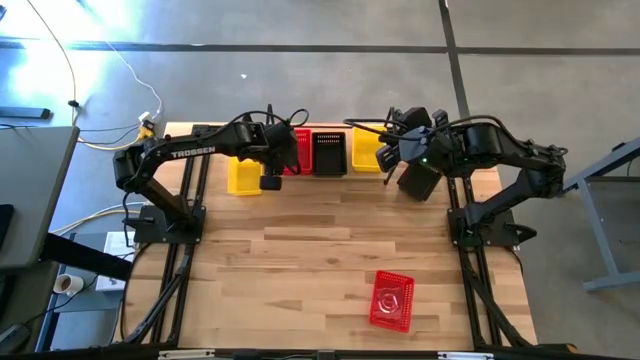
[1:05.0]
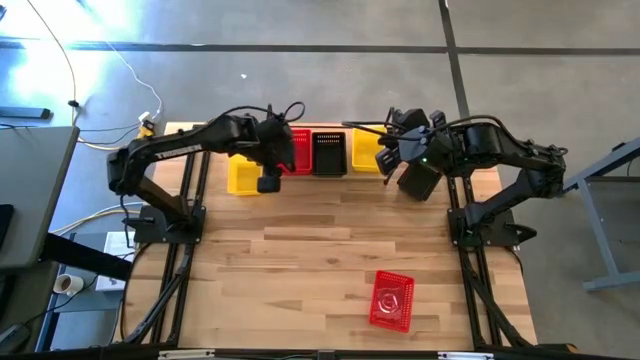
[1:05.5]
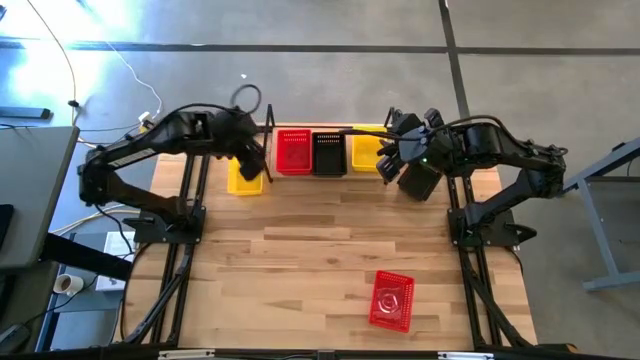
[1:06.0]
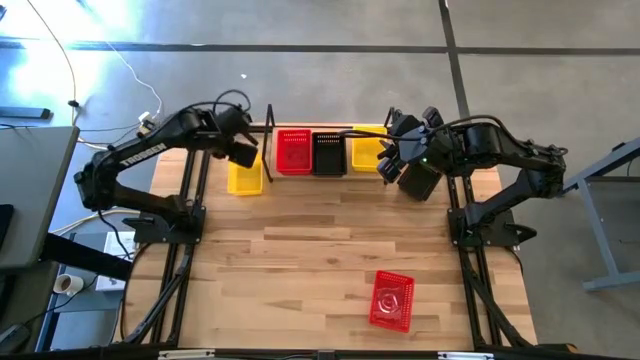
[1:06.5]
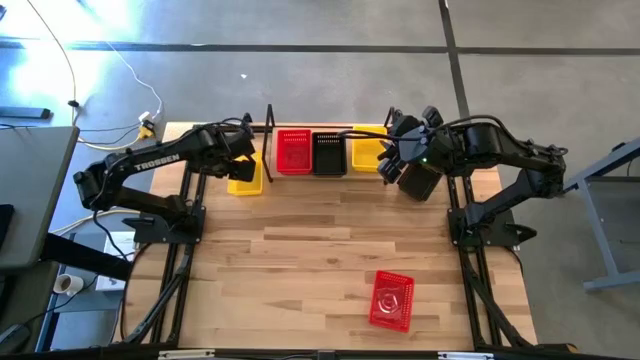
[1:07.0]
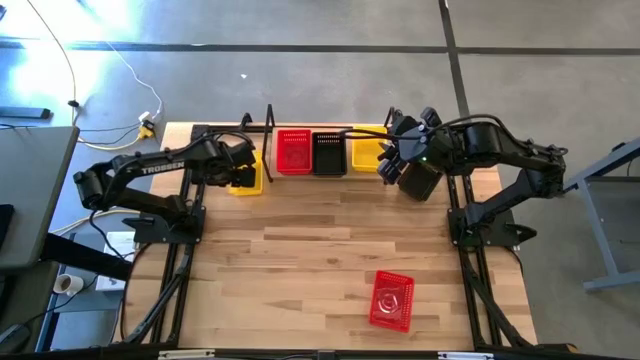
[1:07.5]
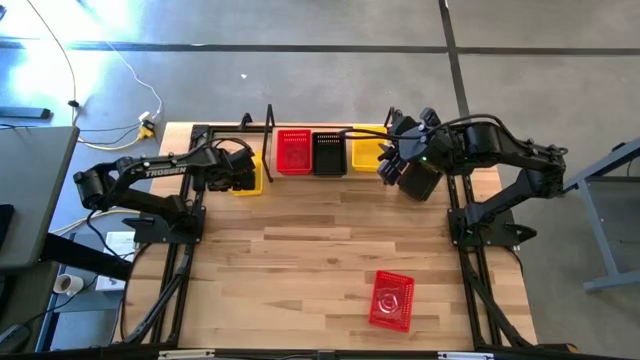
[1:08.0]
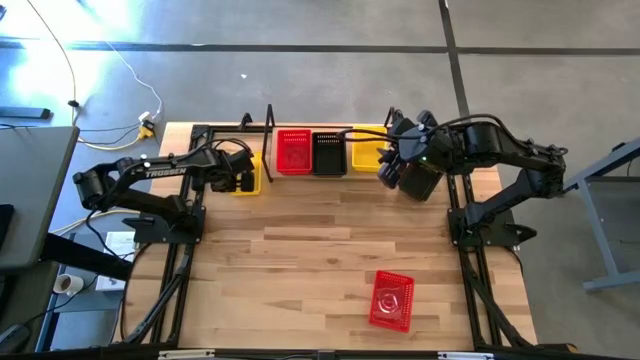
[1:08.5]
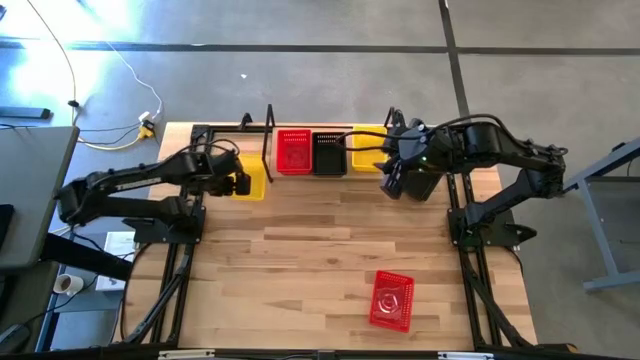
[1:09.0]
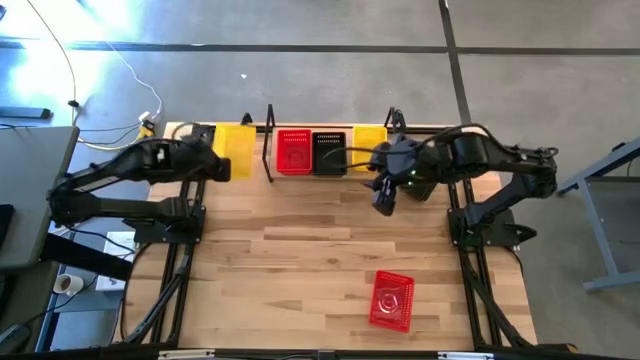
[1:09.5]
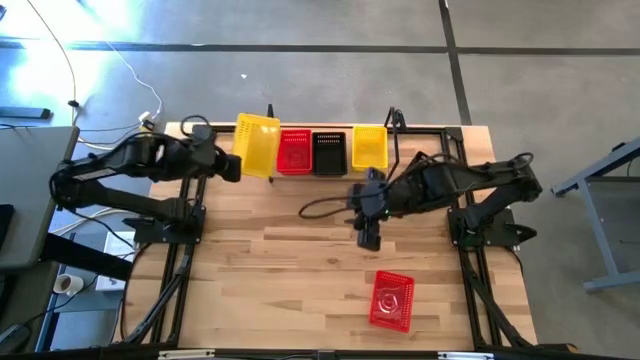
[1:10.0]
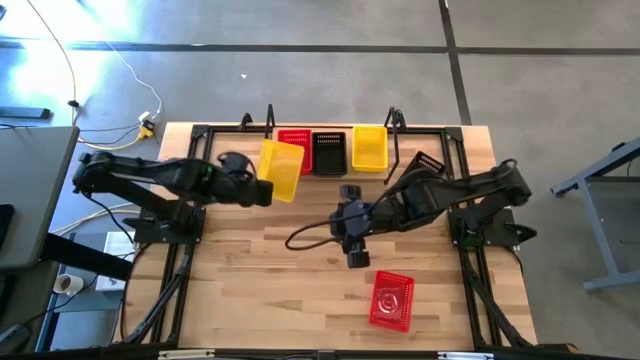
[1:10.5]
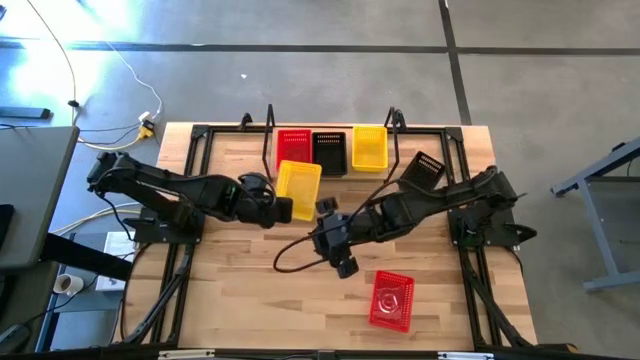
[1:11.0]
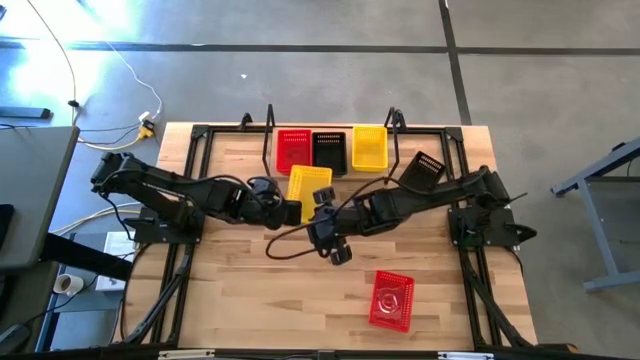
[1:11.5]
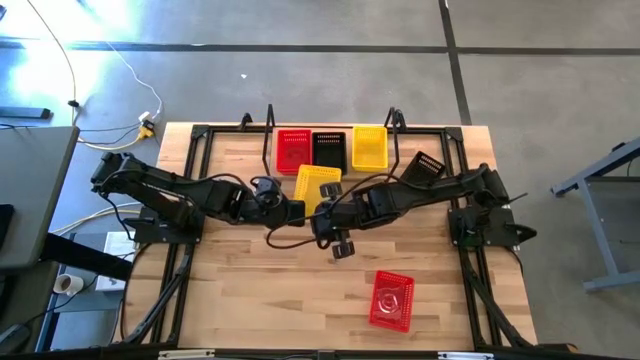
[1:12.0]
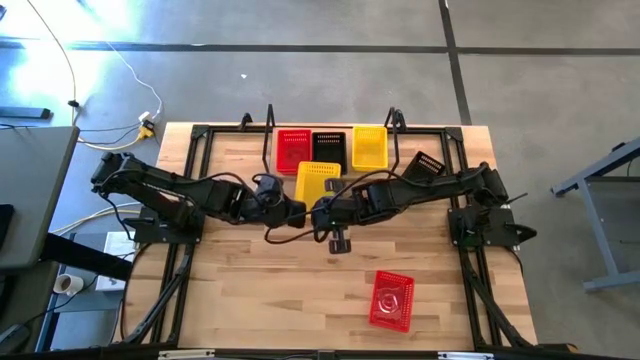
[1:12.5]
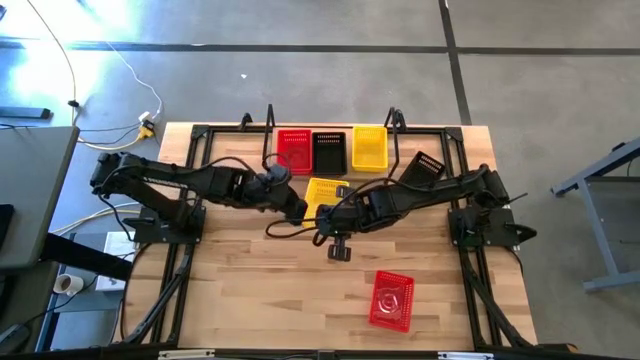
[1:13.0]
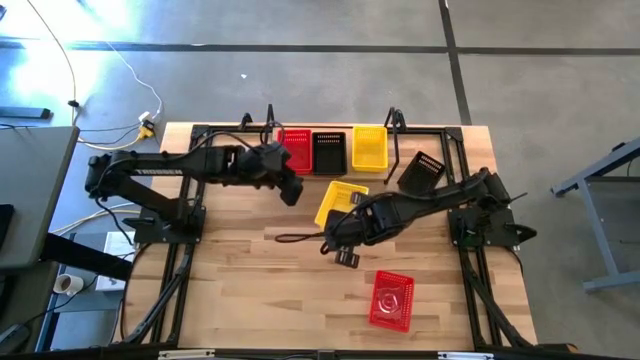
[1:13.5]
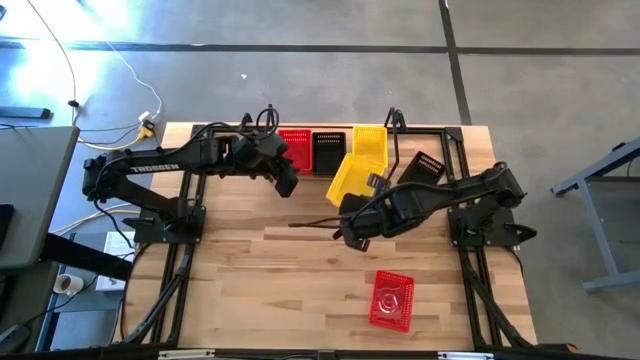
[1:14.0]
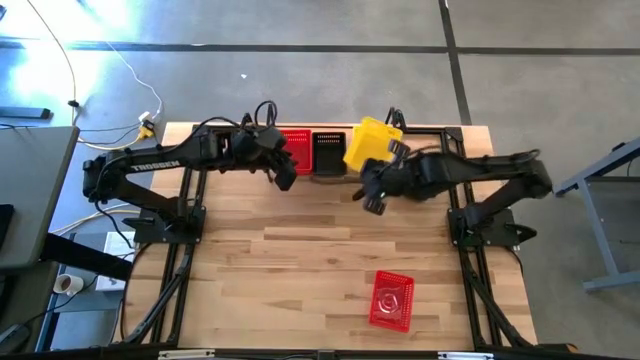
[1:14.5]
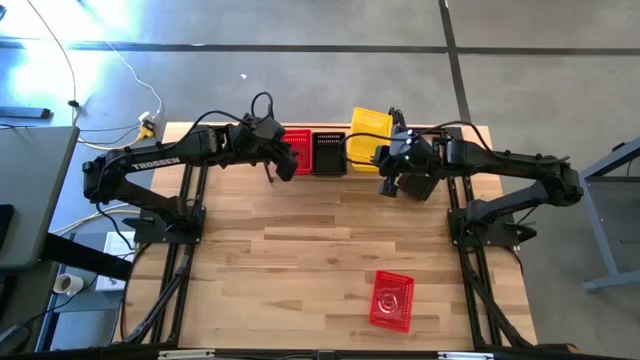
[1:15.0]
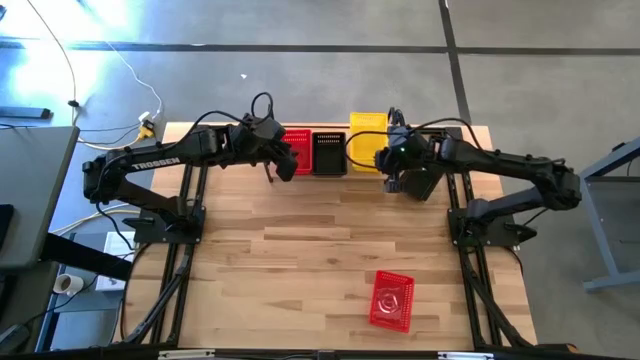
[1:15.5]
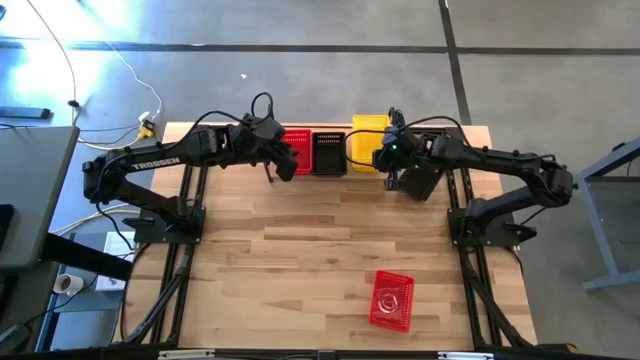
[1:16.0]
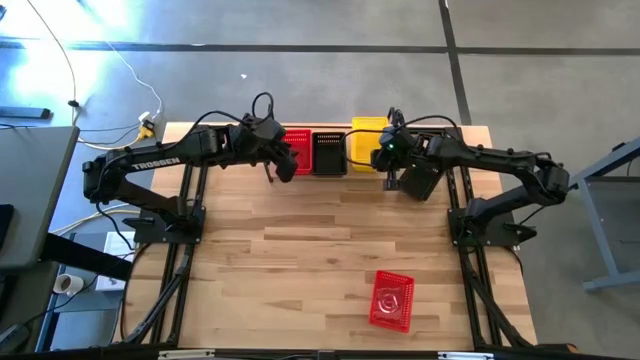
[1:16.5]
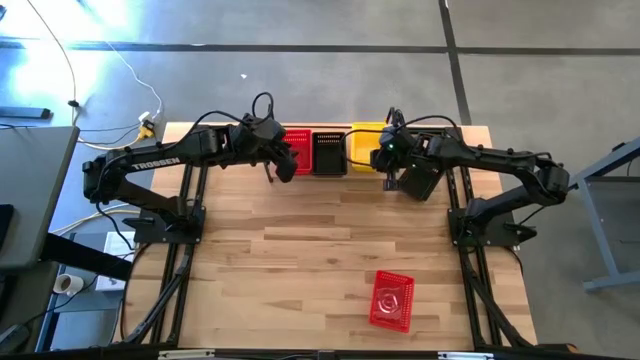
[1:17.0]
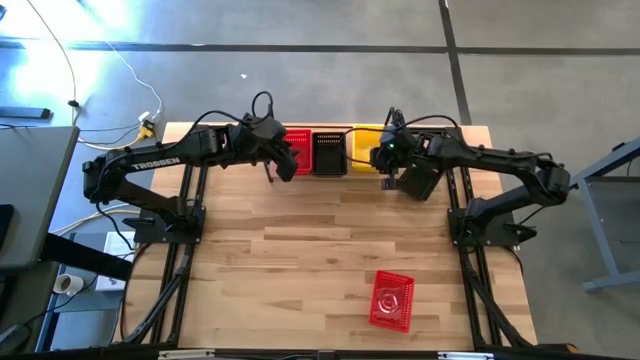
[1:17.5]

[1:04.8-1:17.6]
Task: Stack baskets on shelf by color
Stack the yellow bin on the yellow bins on the shelf

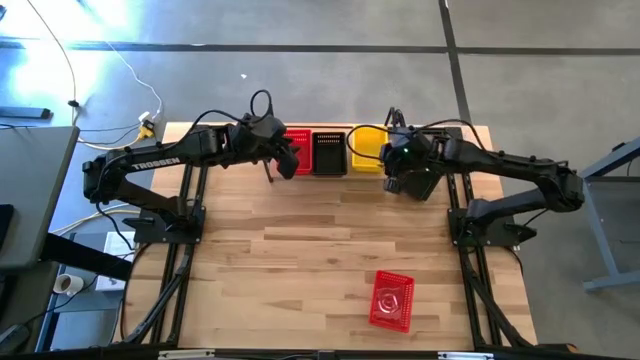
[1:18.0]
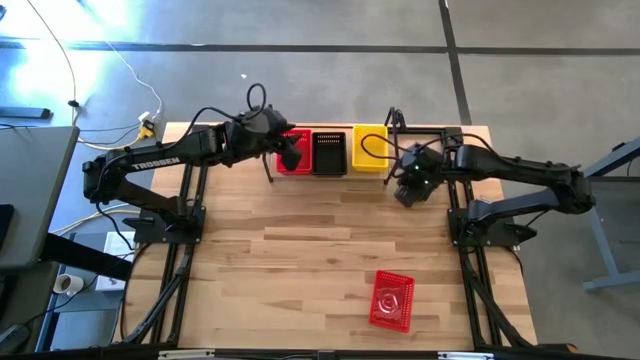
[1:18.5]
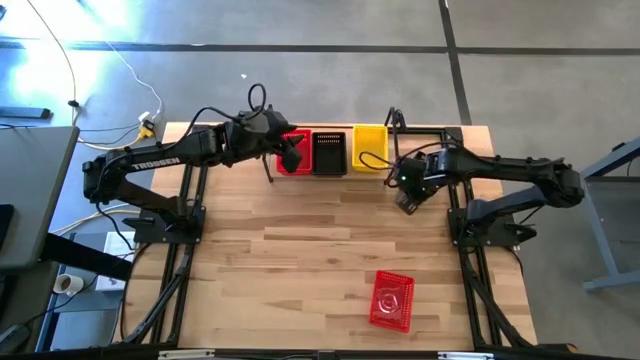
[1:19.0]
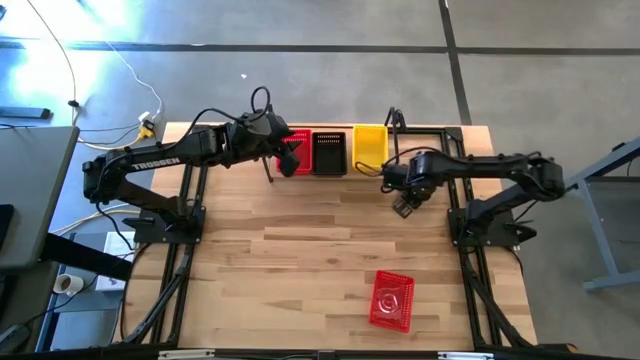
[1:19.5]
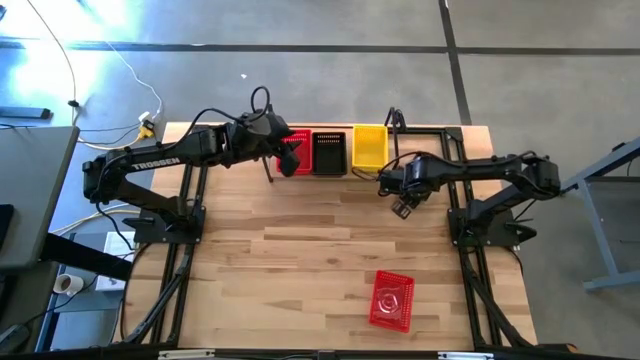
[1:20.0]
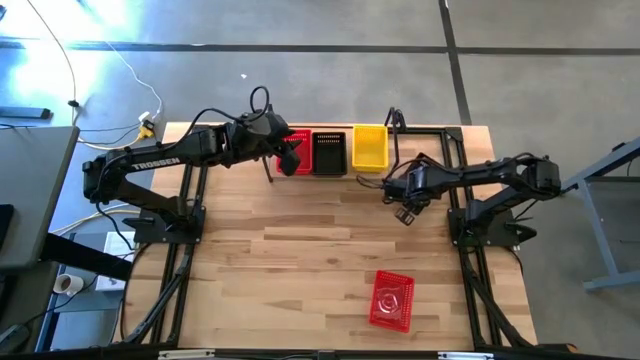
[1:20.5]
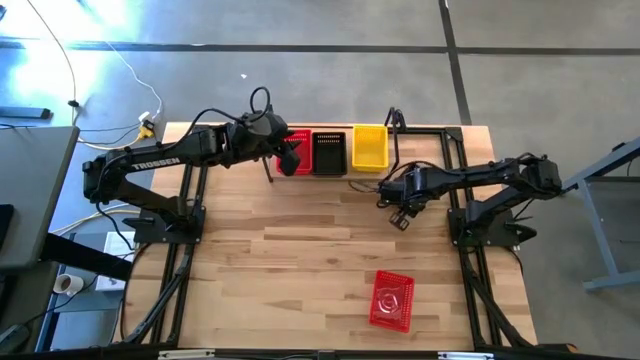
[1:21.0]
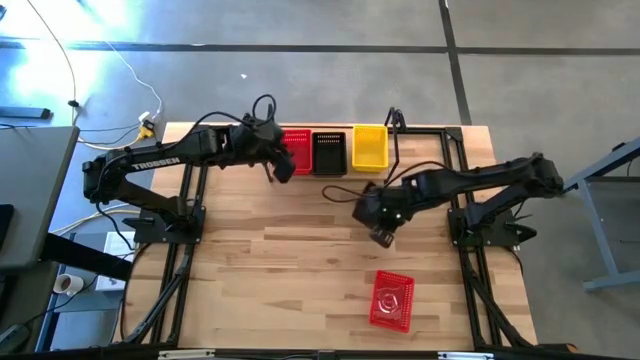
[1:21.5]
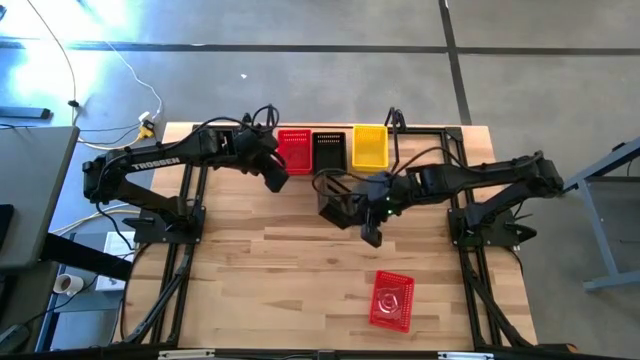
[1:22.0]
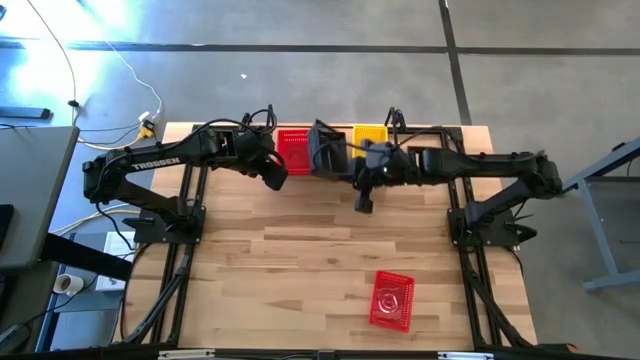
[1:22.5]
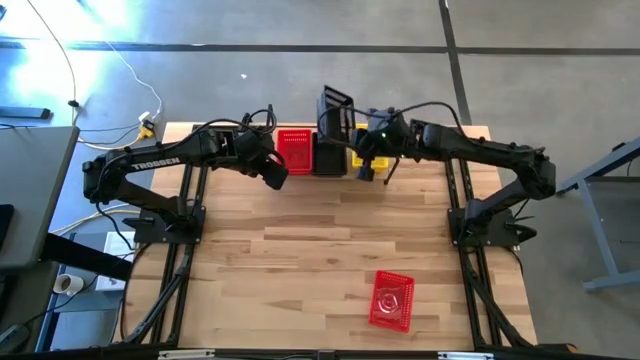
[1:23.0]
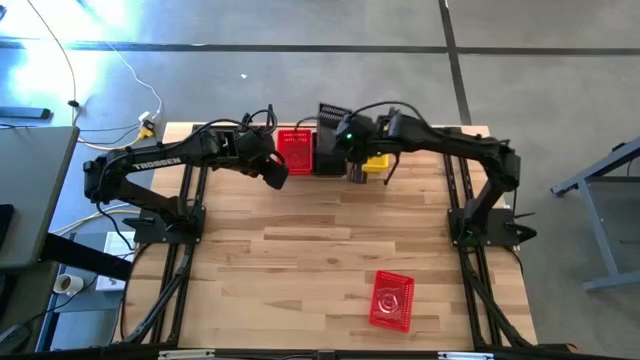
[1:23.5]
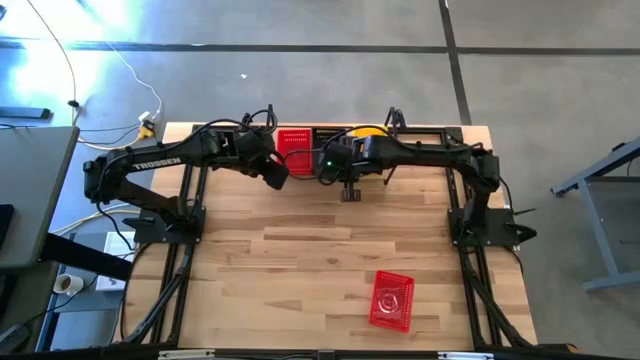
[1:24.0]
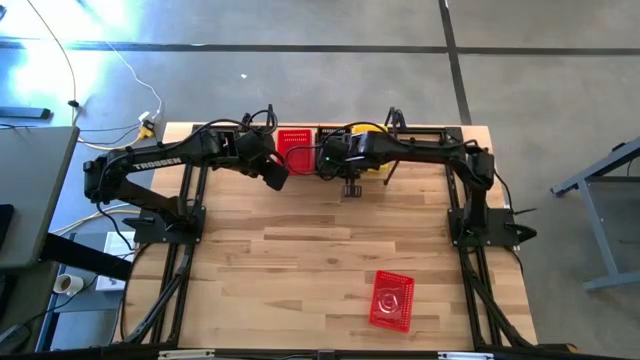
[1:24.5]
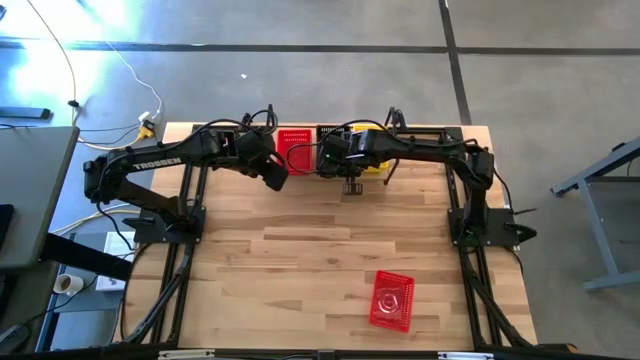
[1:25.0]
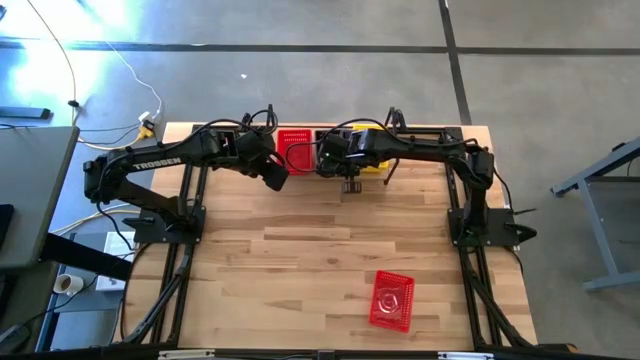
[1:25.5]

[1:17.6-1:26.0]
Stack the black bin on the black bins on the shelf

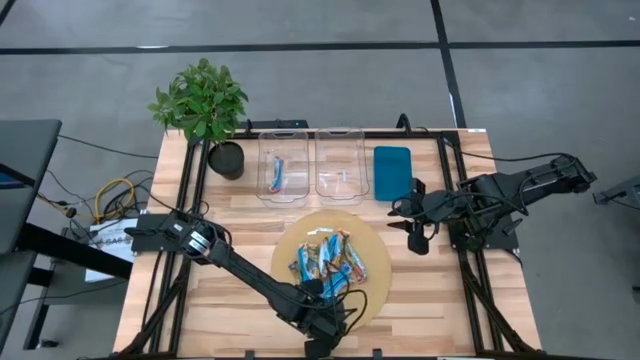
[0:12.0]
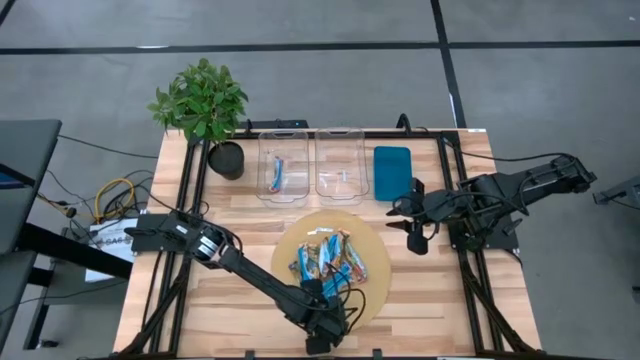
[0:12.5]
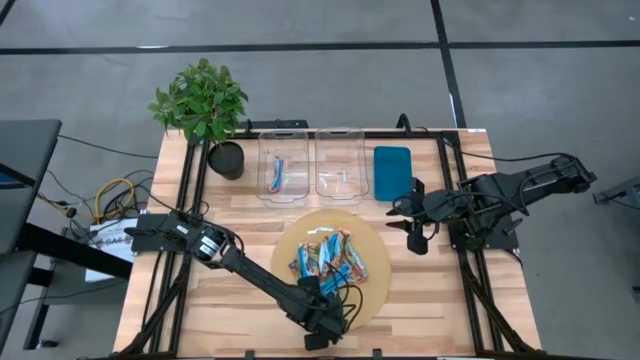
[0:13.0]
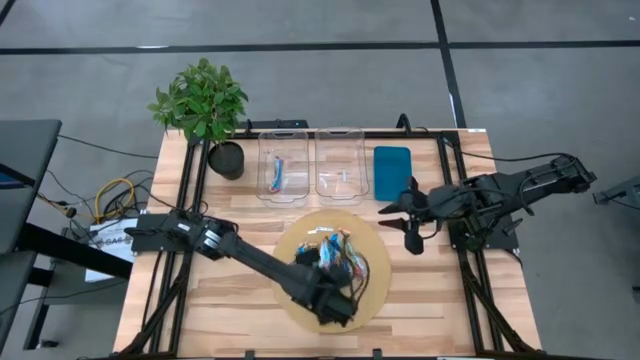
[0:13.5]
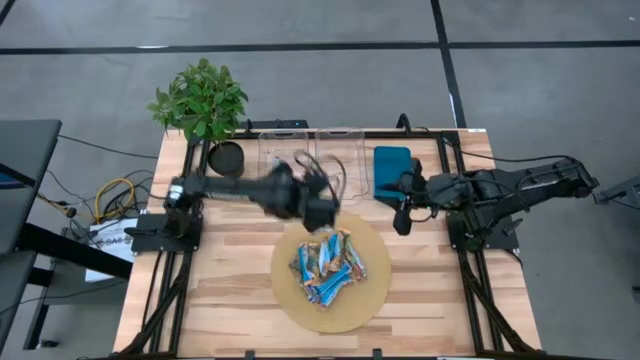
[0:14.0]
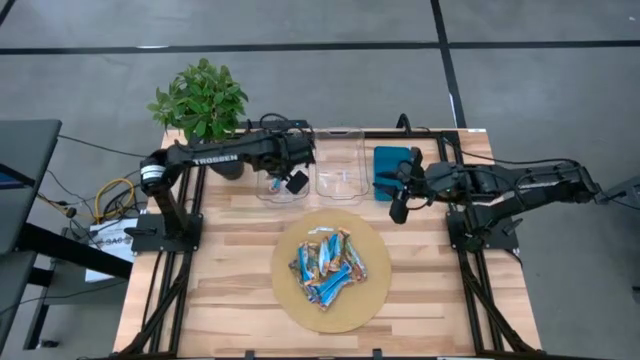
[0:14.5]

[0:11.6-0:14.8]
Task: Pick and place Granola Bars by type
Put the bottom red granola bar into the left transparent bin
